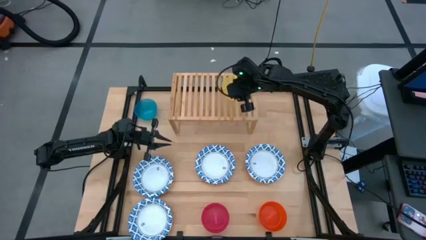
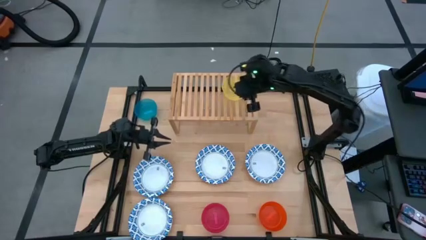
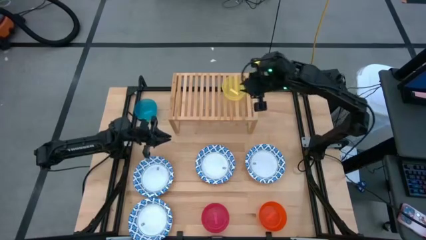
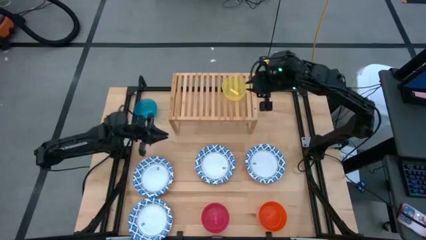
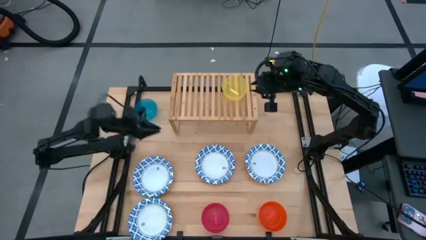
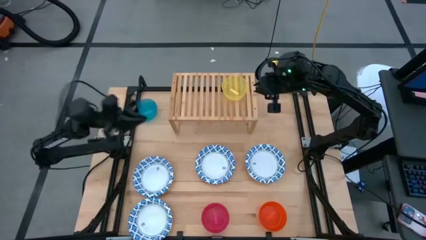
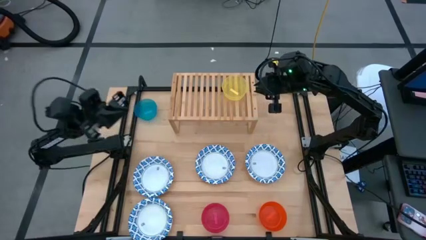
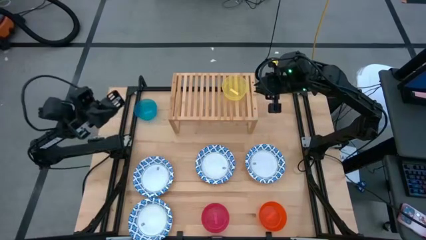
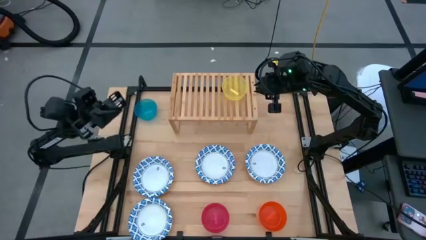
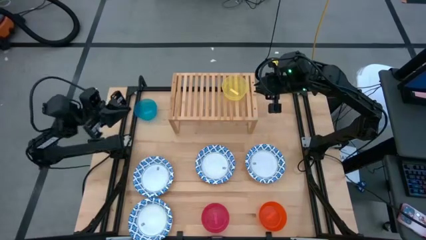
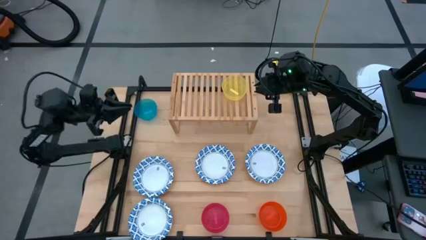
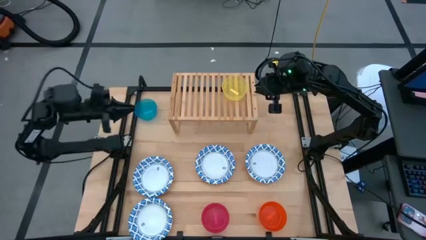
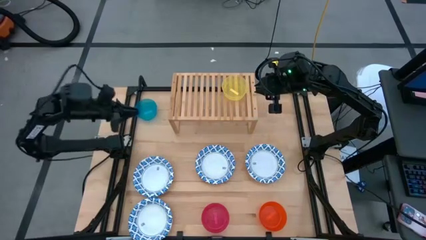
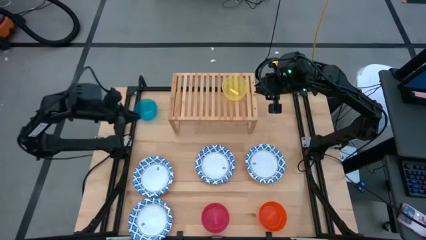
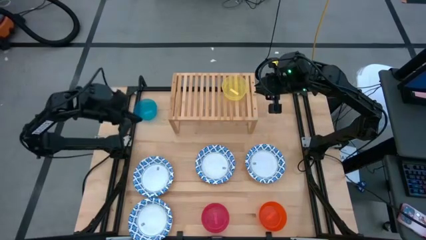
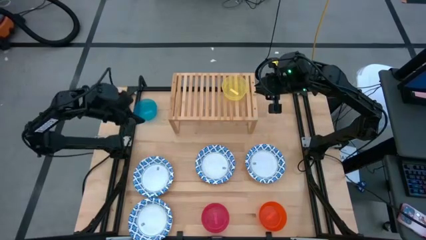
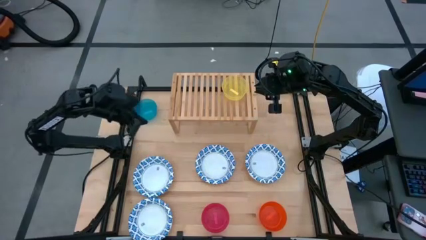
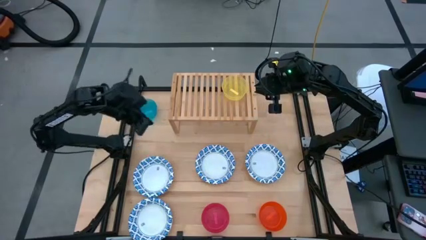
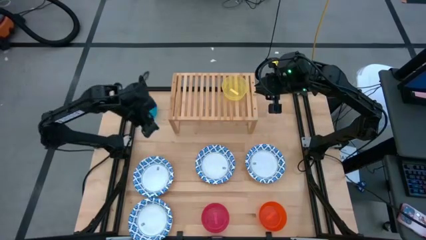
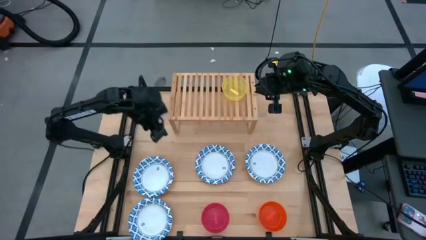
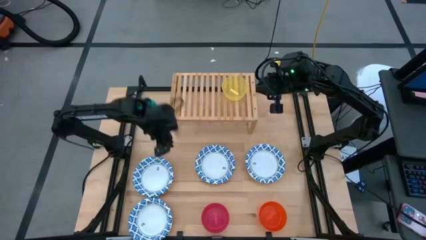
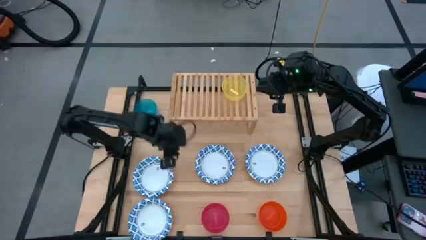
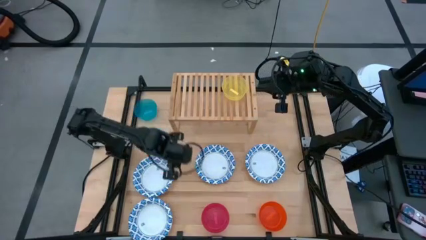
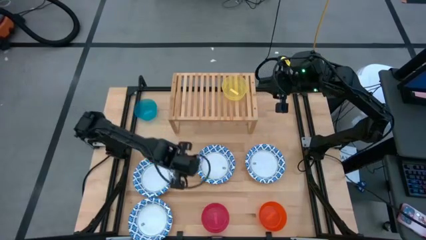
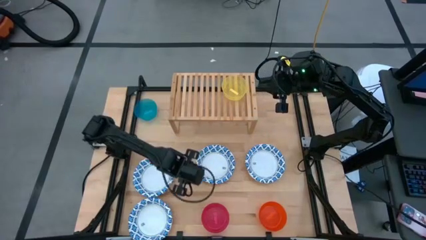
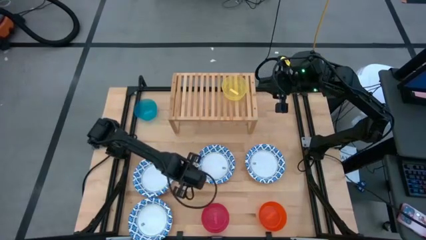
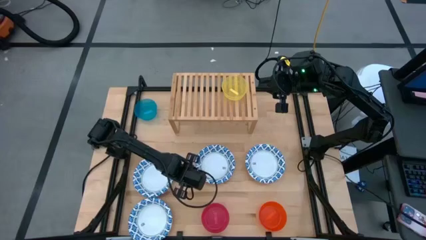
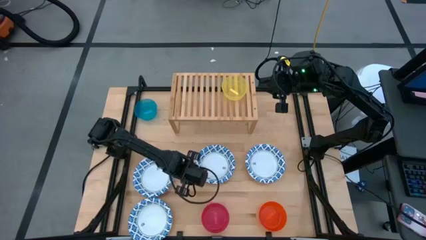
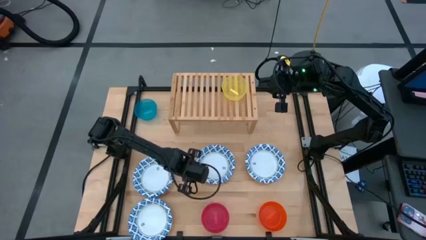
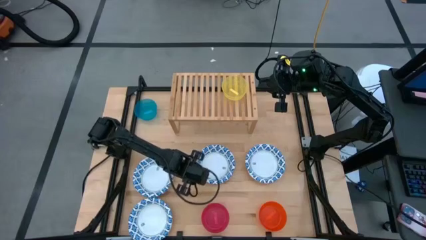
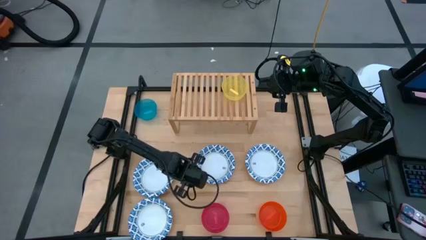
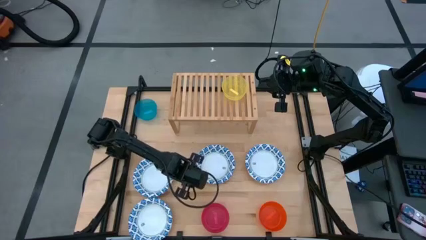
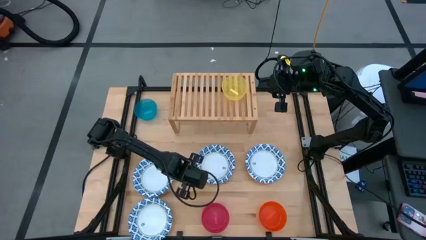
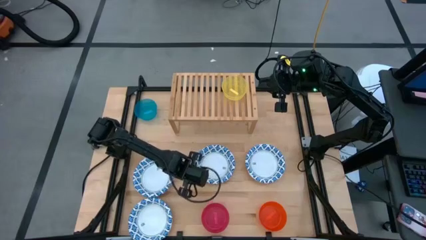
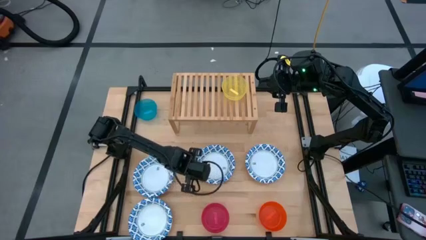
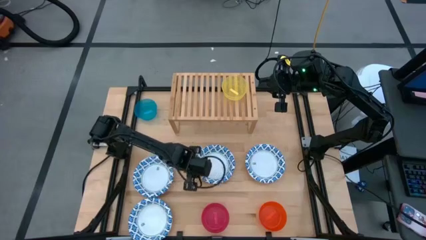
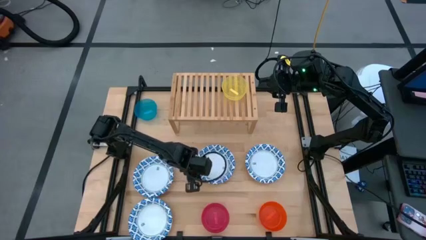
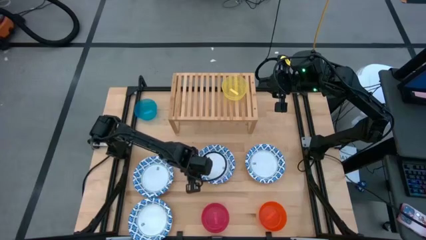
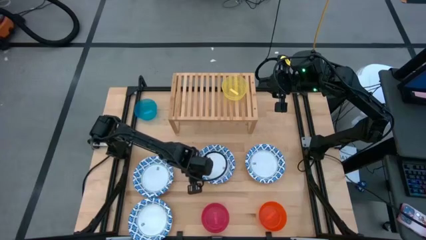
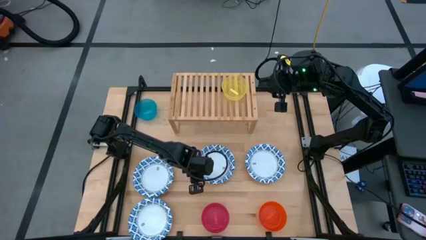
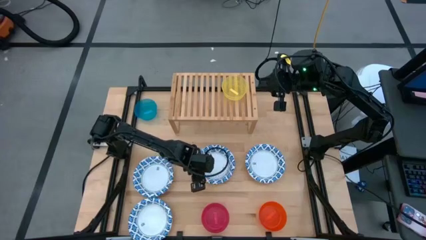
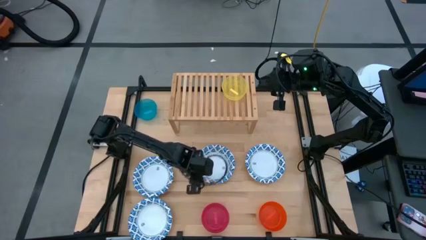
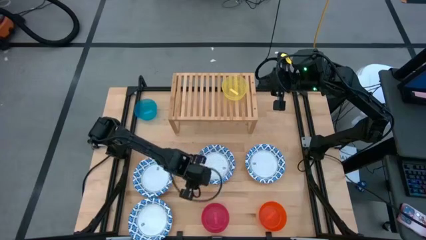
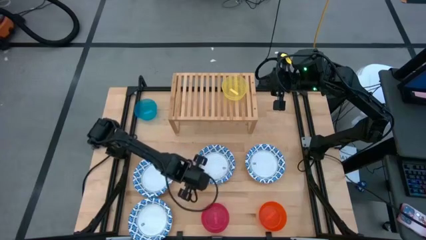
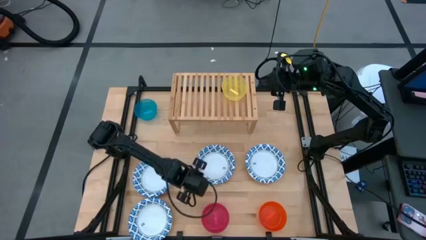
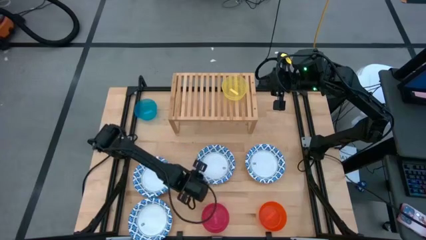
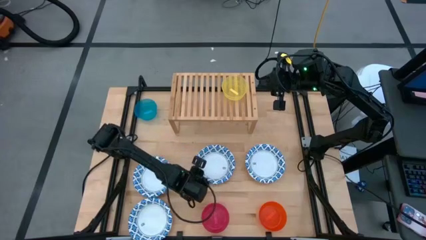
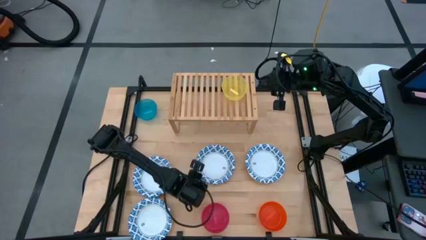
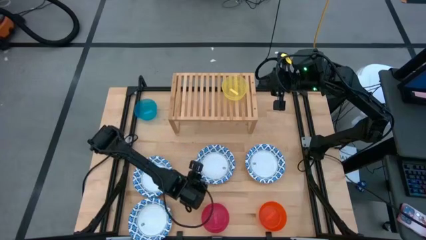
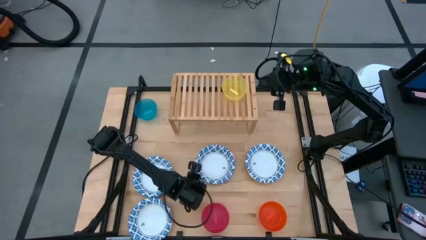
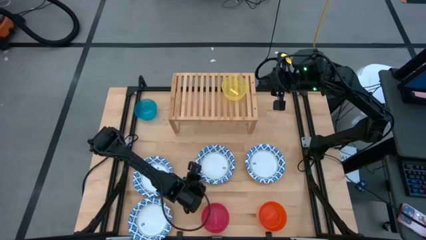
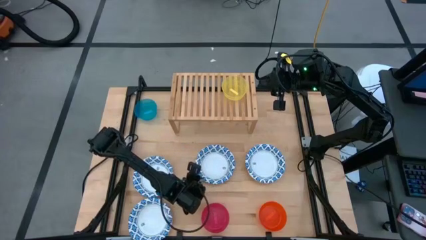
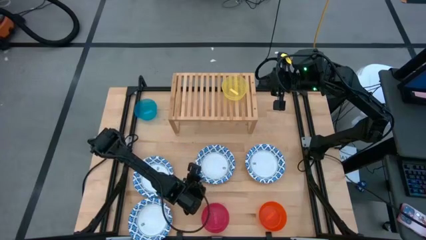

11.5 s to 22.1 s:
Task: Place and stack bowls onto a shelf
Put the top middle white patterned bowl on the shelf

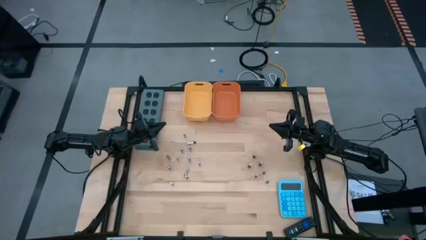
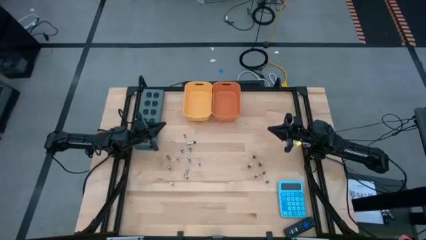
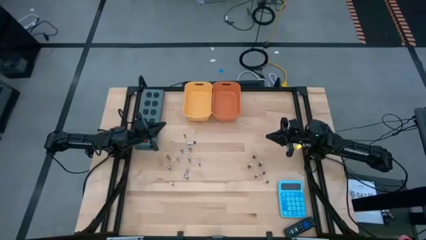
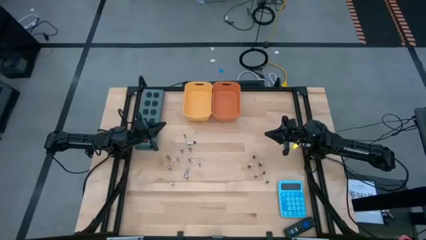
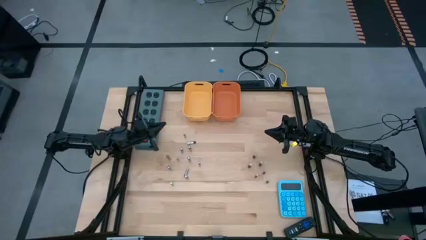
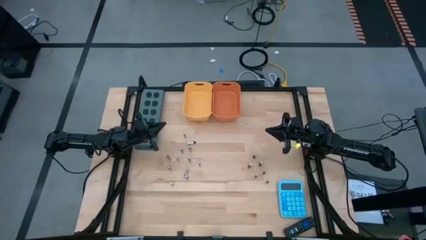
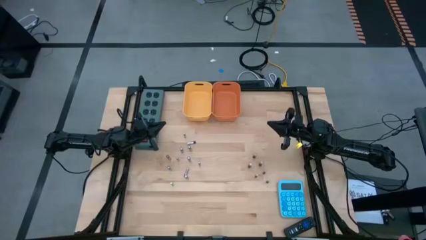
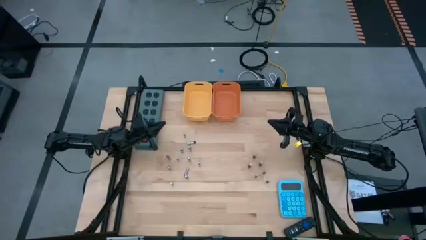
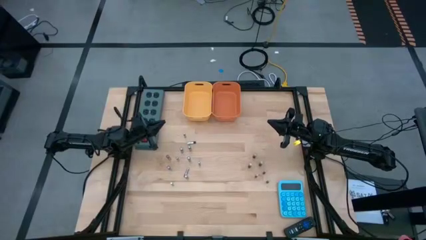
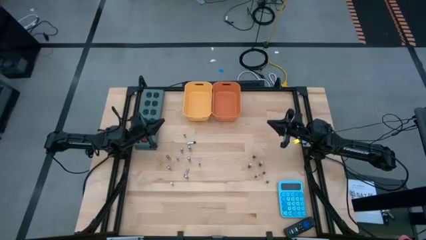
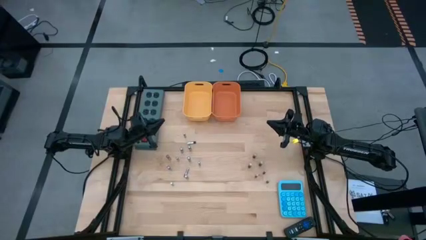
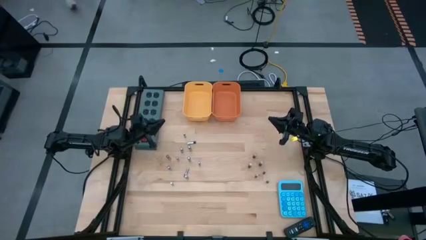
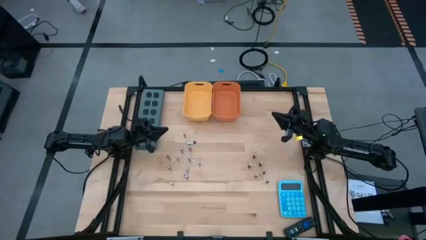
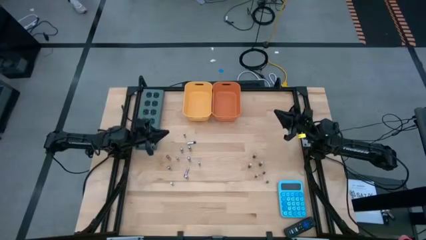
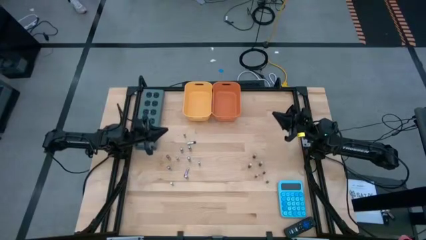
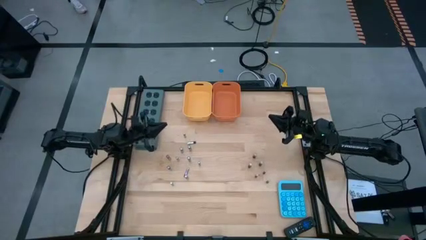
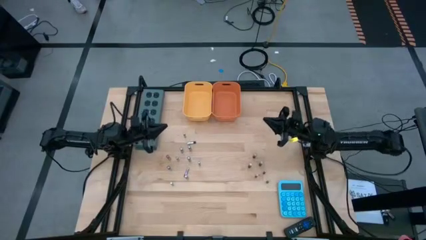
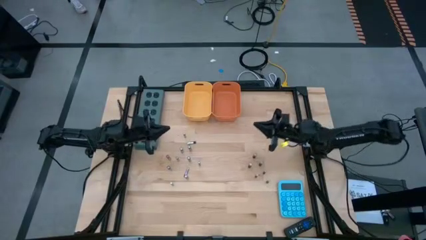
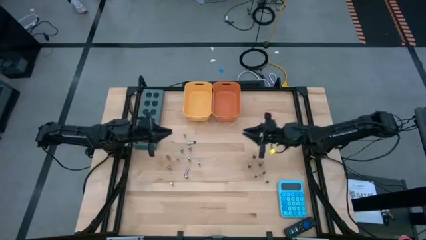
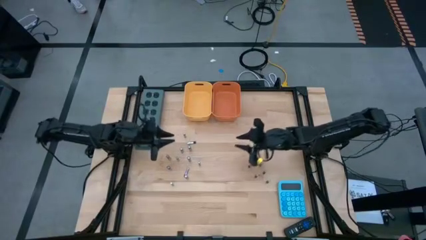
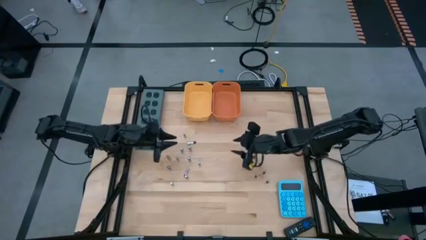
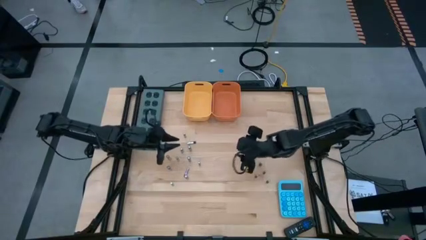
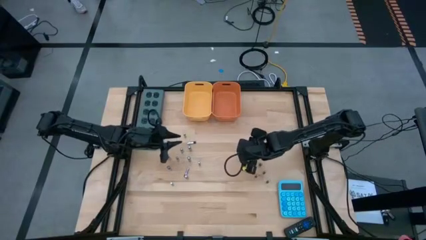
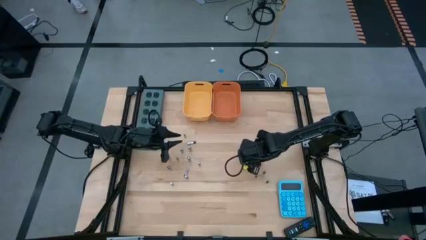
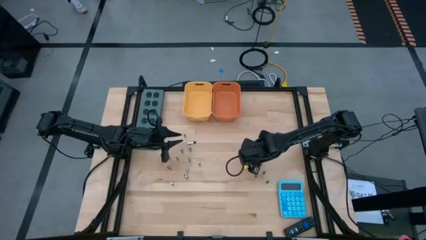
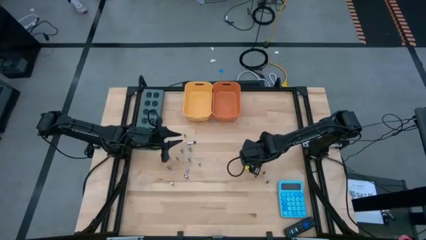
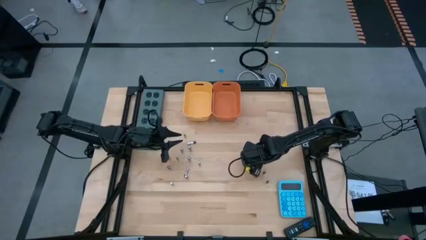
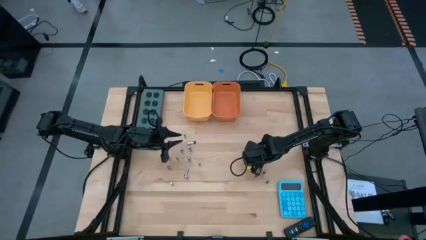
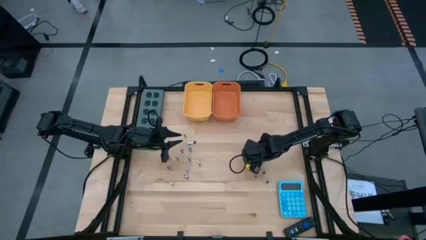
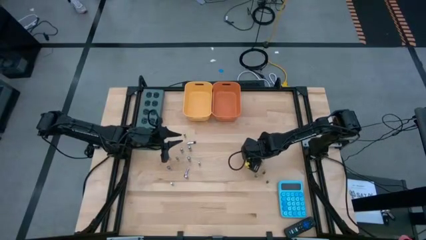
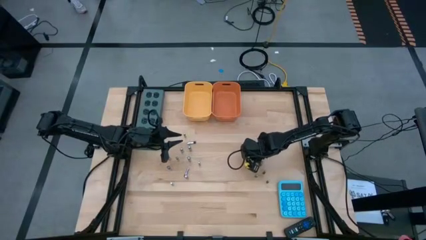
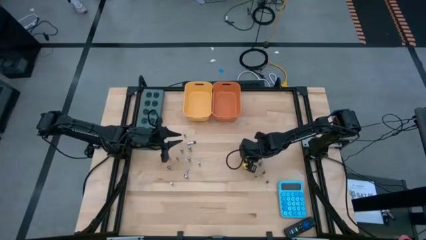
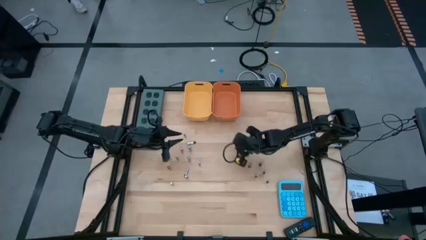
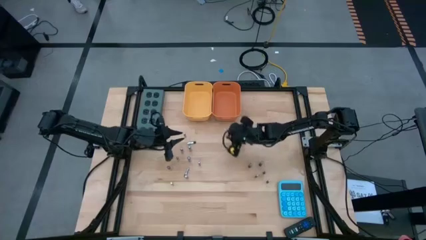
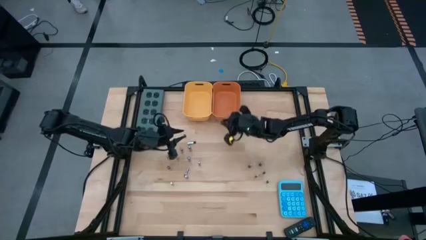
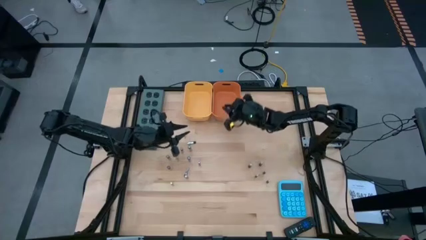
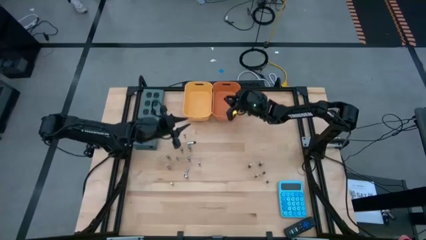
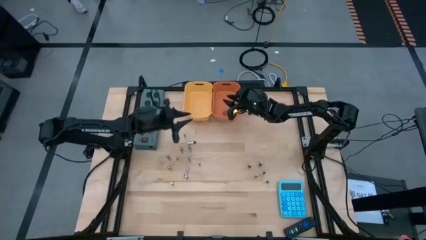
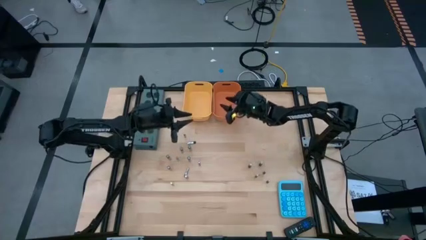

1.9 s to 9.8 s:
Task: Sort batteries
Put the black battery into the orange bin
